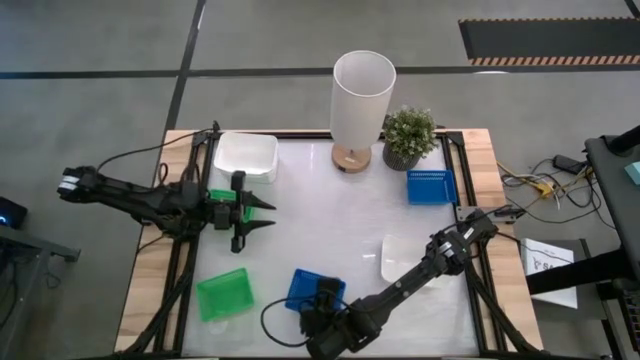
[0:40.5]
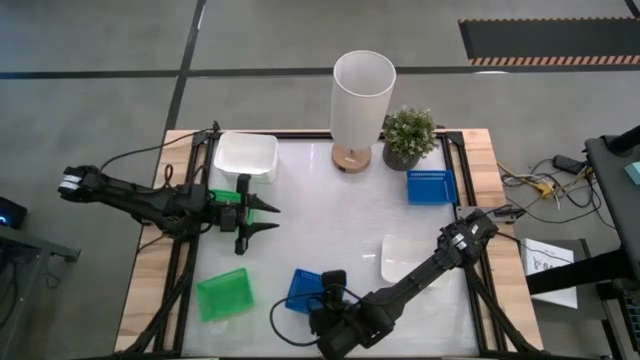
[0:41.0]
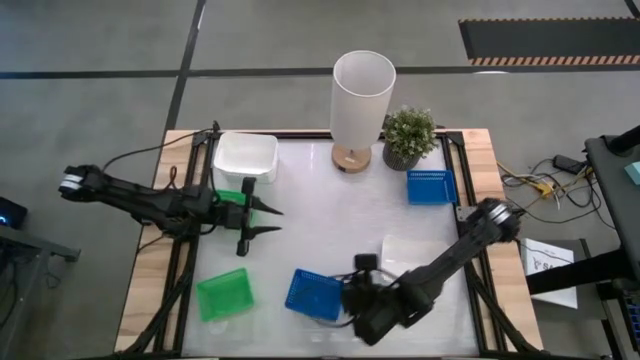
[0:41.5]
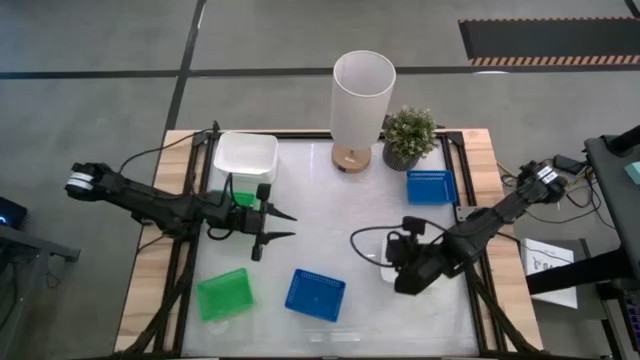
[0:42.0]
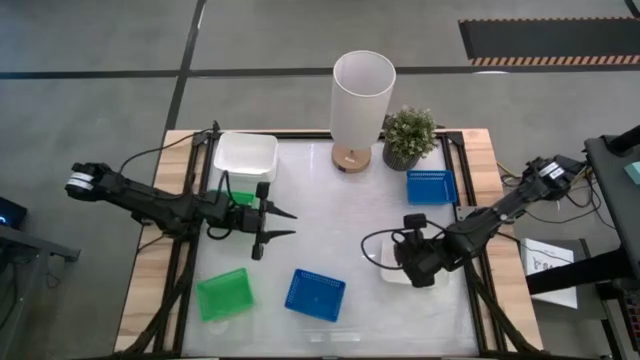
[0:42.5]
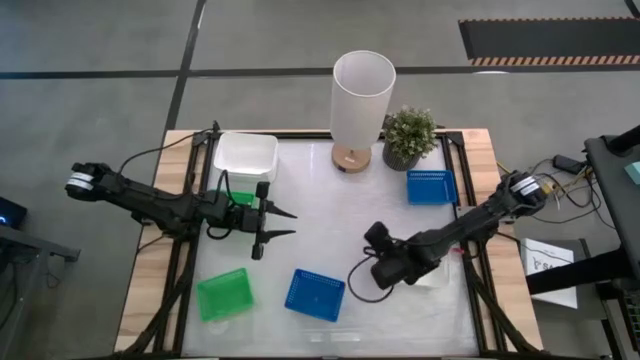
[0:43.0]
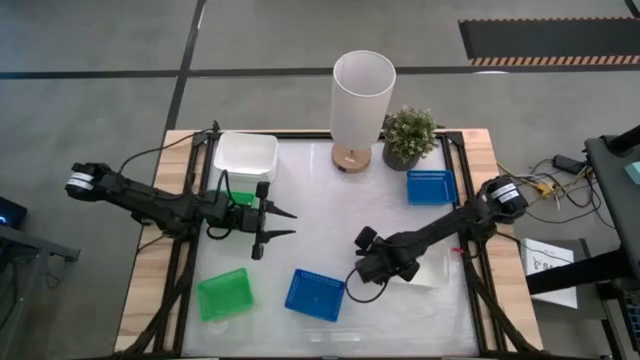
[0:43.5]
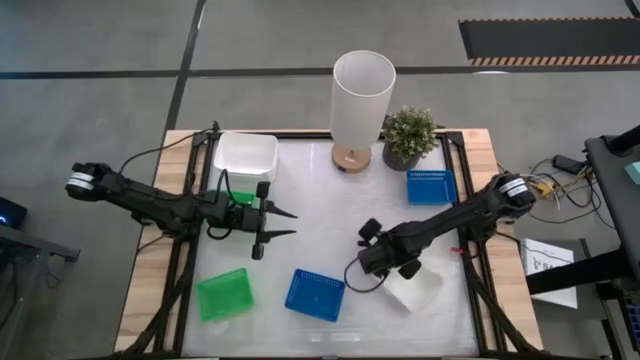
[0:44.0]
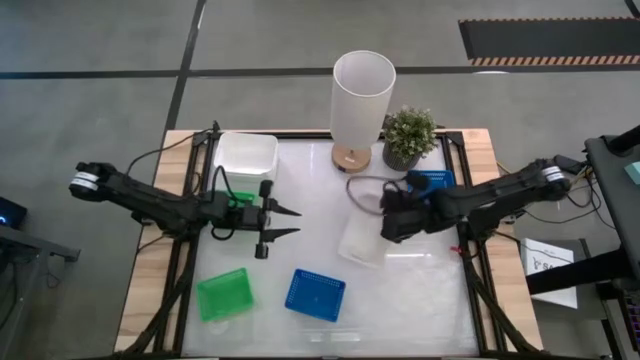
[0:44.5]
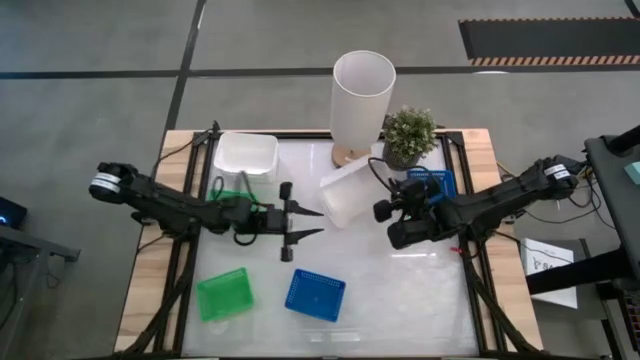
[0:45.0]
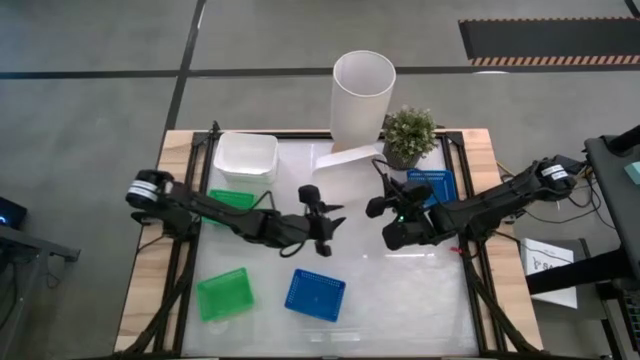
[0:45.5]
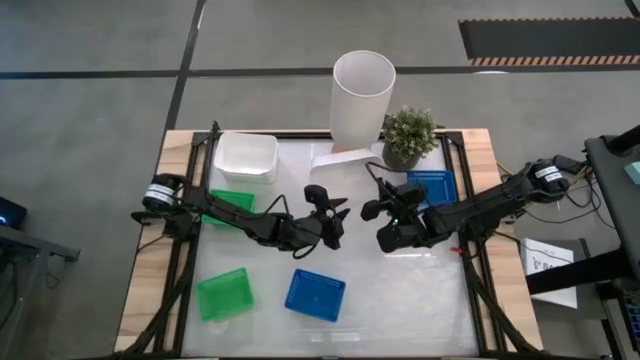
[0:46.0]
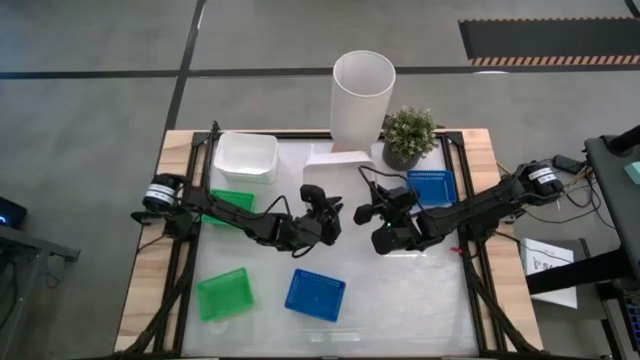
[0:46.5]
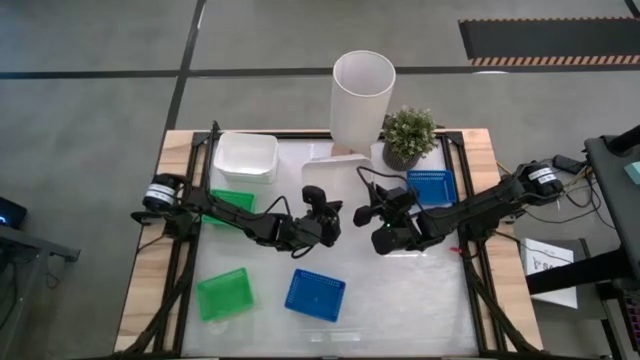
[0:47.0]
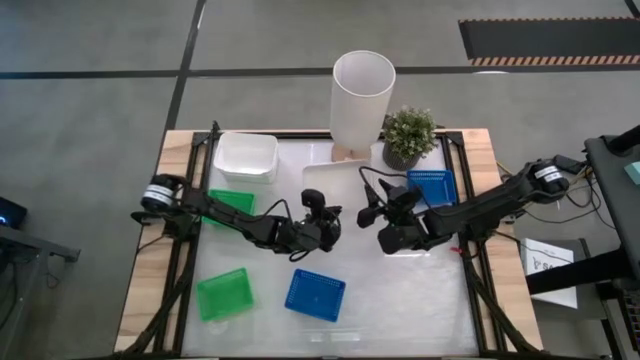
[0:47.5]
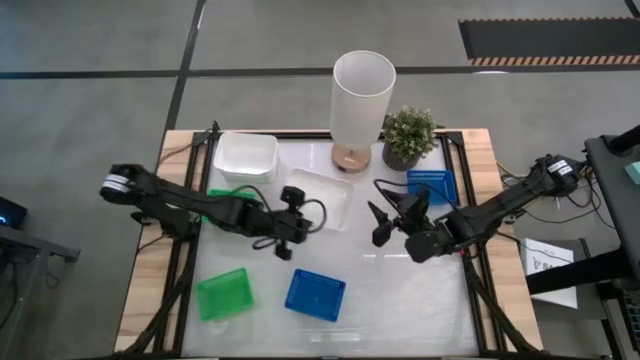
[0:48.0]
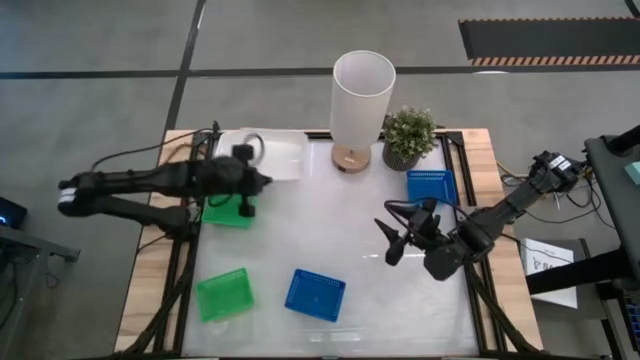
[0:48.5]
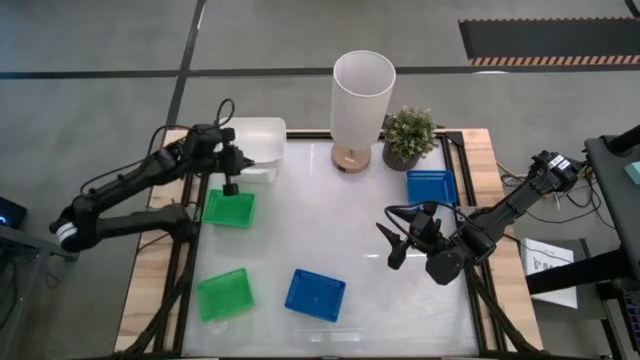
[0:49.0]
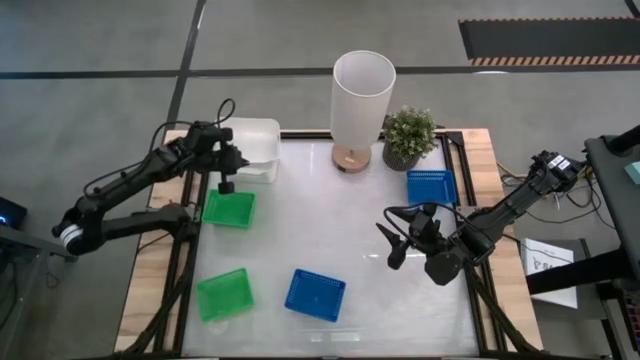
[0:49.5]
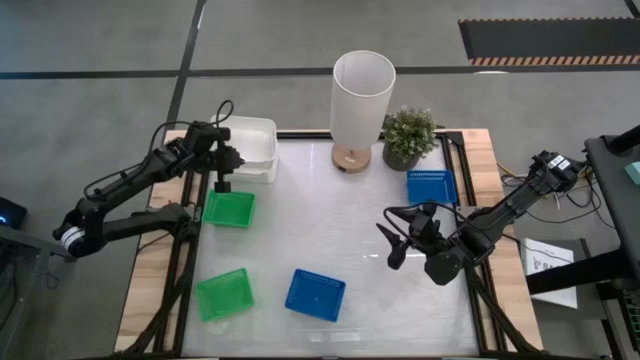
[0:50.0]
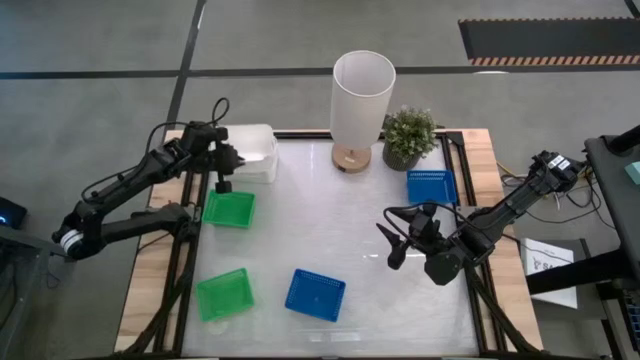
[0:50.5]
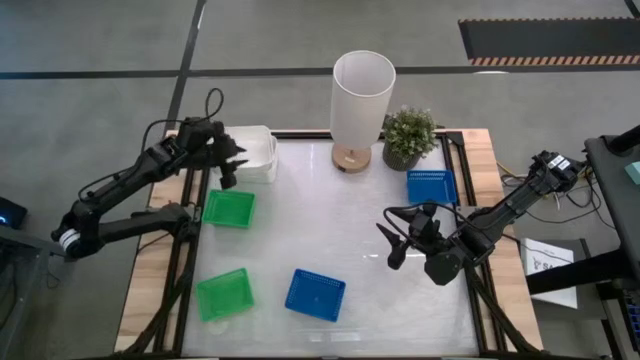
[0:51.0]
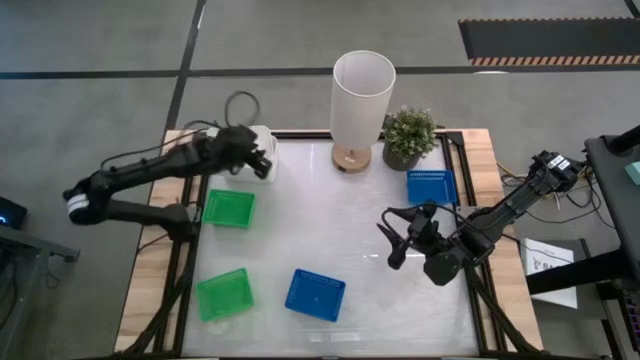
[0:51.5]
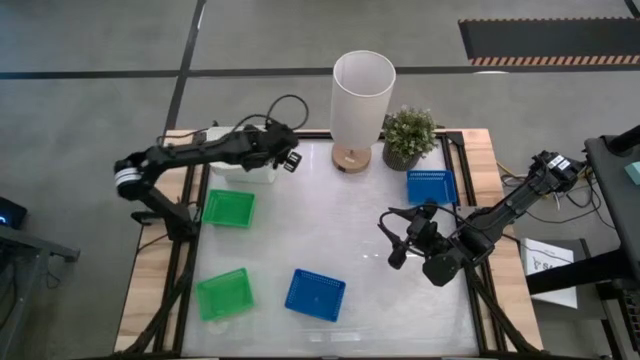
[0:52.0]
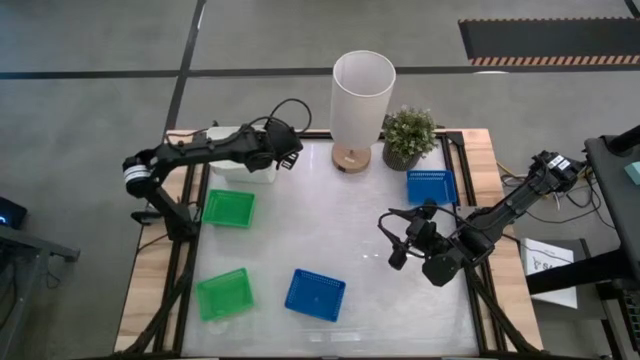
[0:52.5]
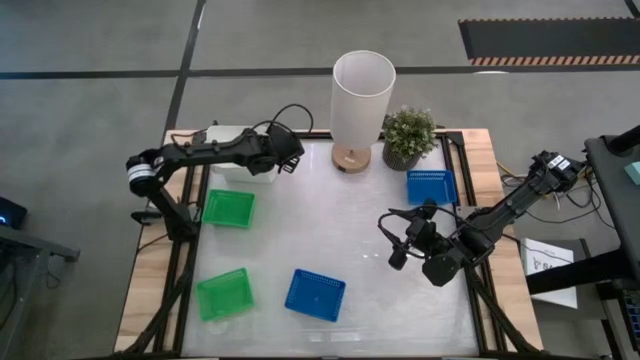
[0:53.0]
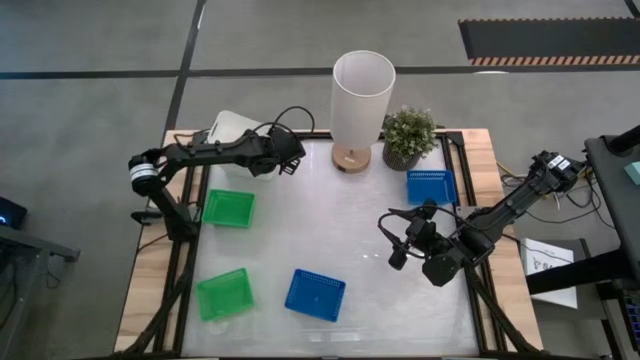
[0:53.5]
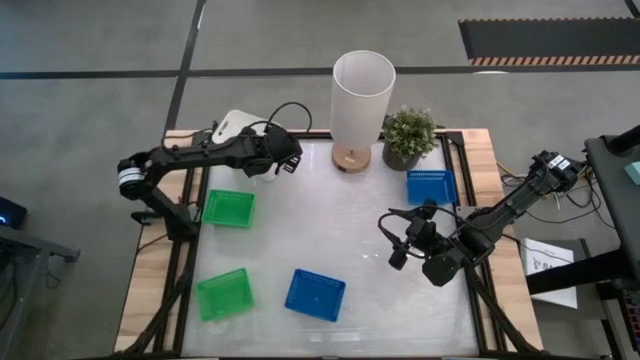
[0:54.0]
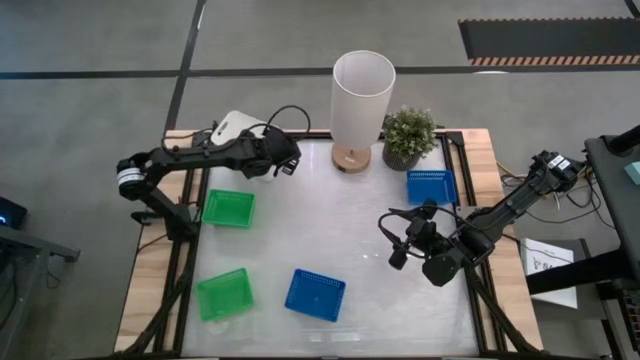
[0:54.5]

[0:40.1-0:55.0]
Stack the right white bin on the white bins

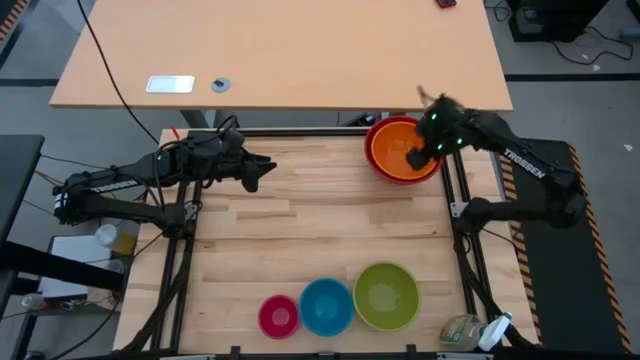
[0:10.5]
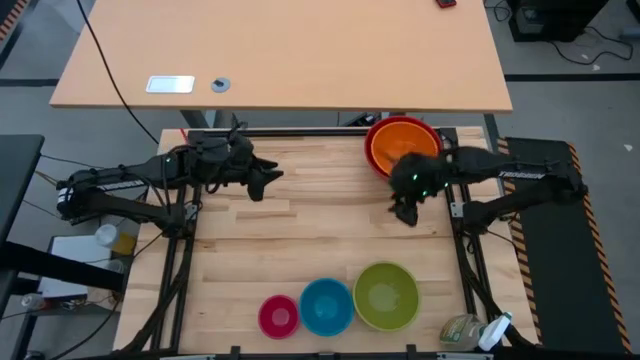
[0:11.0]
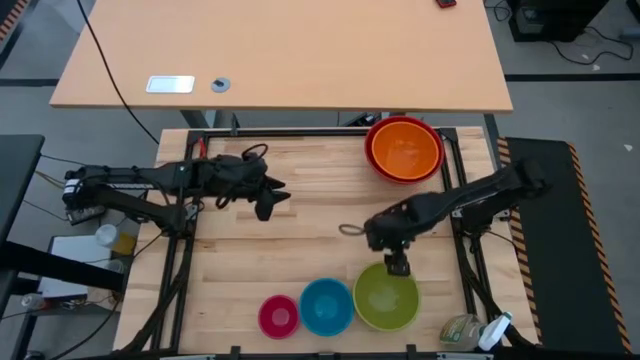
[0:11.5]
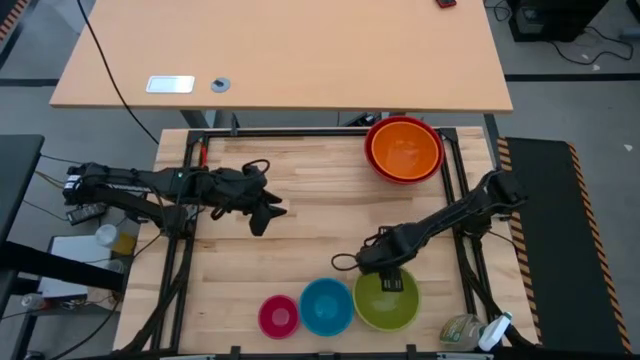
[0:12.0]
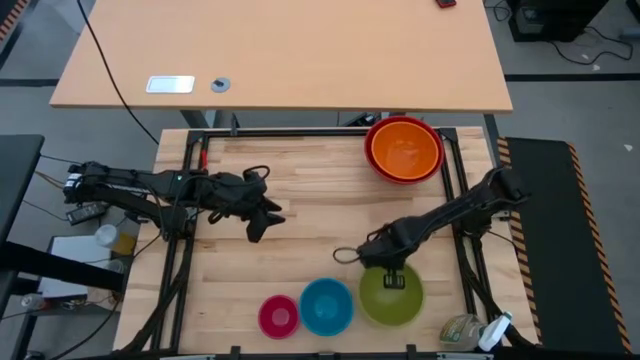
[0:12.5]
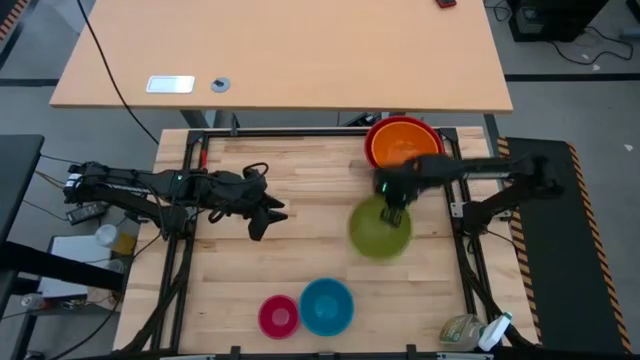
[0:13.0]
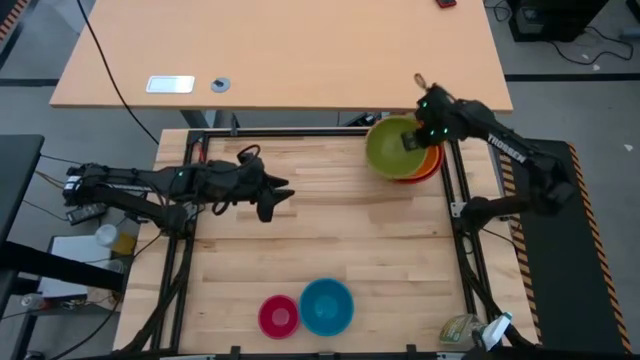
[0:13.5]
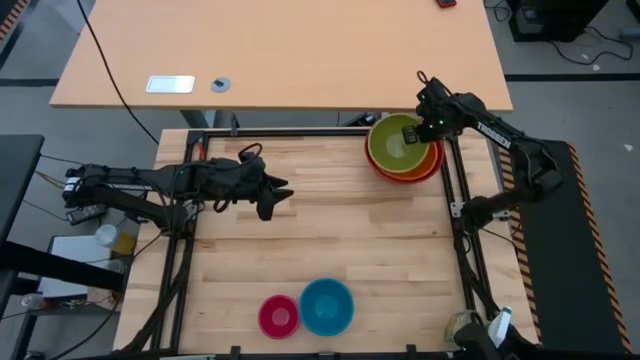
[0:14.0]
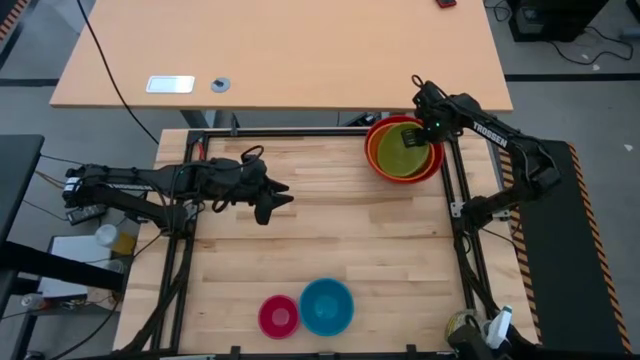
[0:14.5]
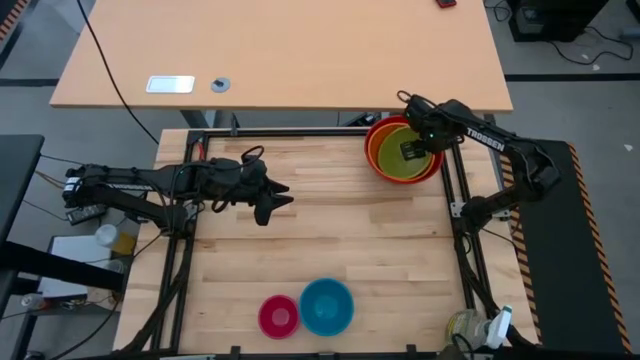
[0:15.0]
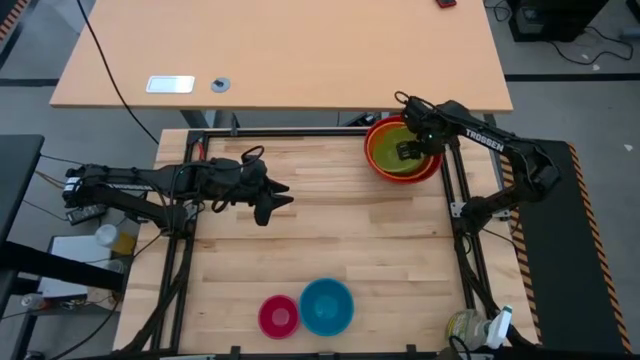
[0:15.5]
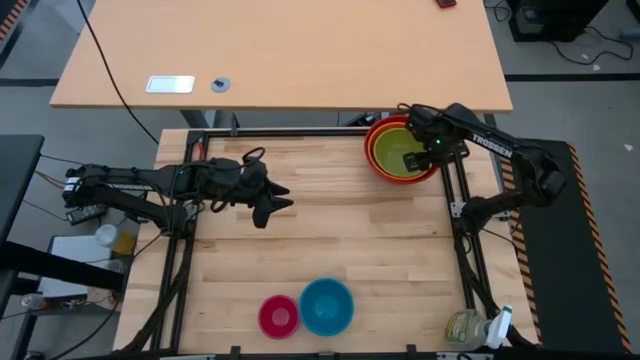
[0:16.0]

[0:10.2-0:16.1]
Stack the green bowl on the orange bowl
